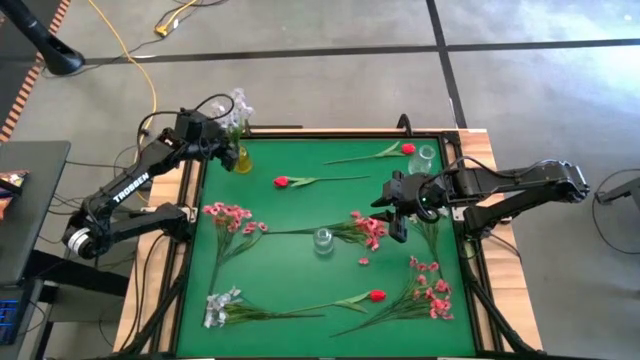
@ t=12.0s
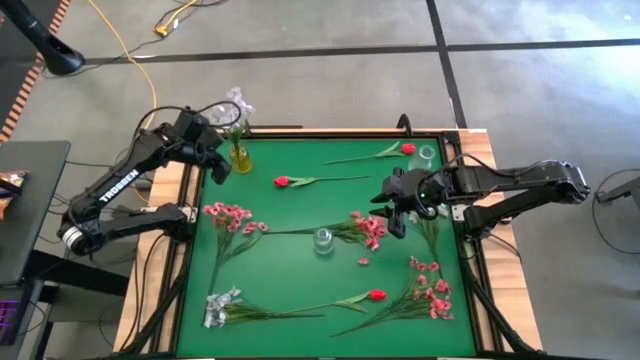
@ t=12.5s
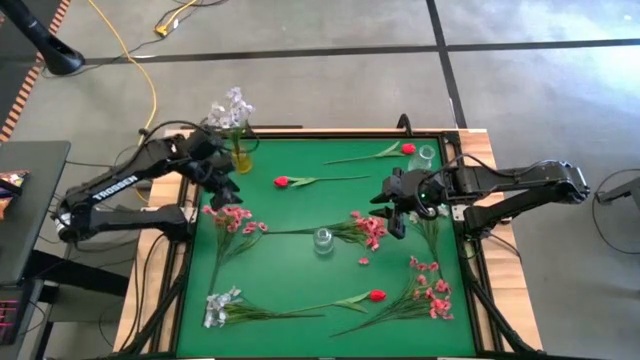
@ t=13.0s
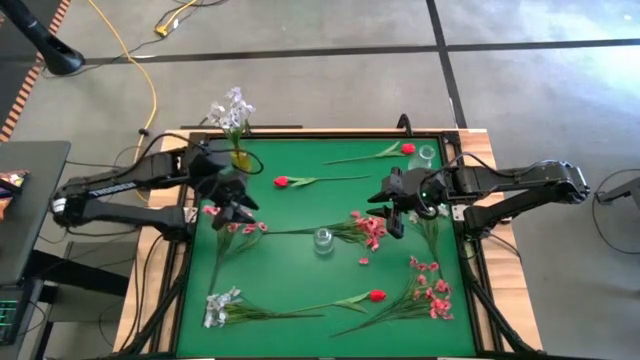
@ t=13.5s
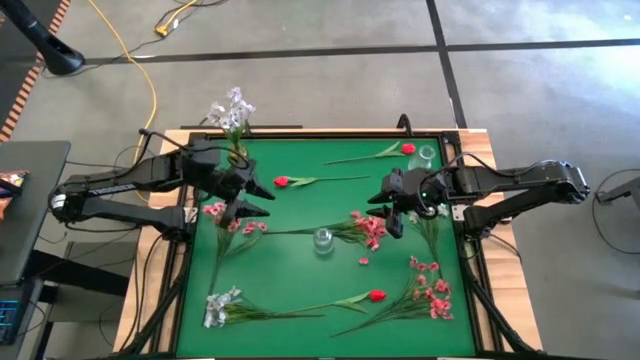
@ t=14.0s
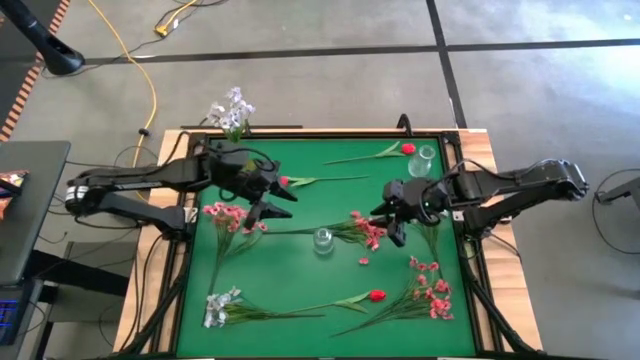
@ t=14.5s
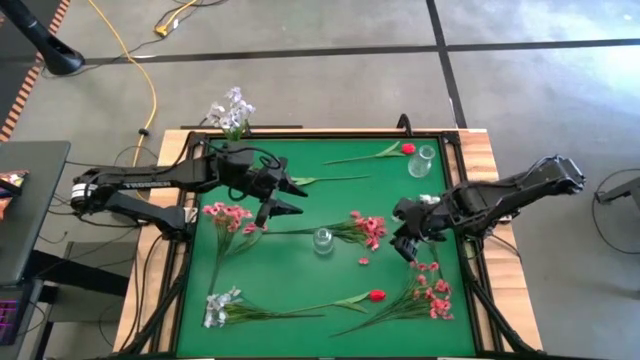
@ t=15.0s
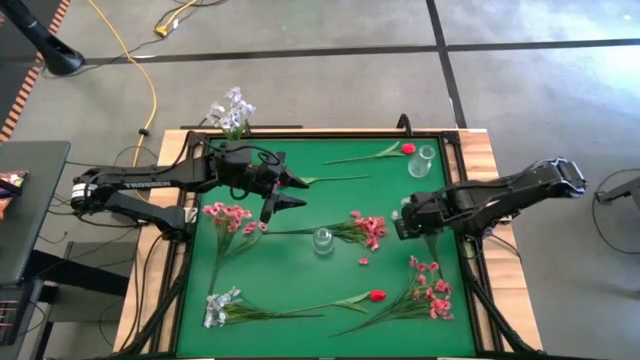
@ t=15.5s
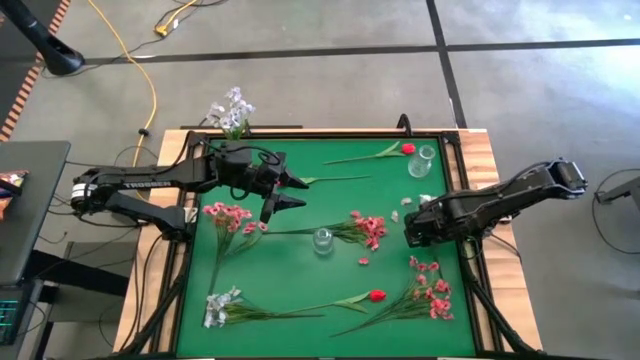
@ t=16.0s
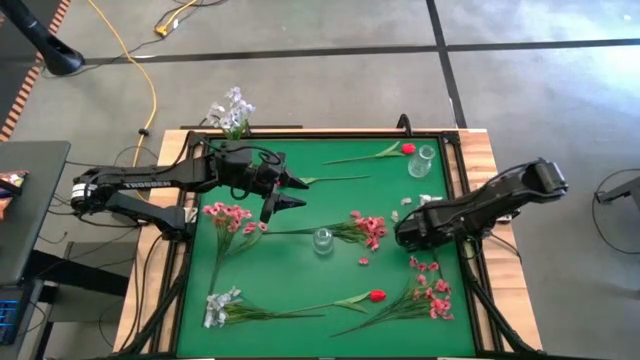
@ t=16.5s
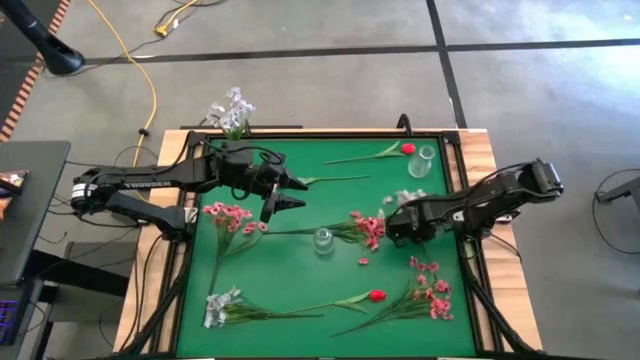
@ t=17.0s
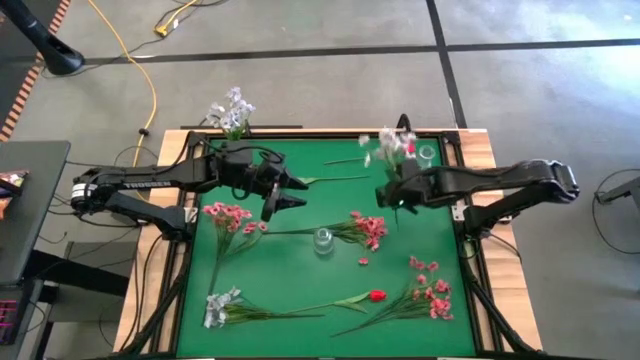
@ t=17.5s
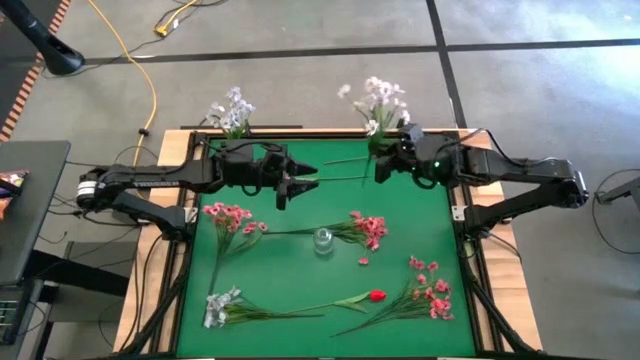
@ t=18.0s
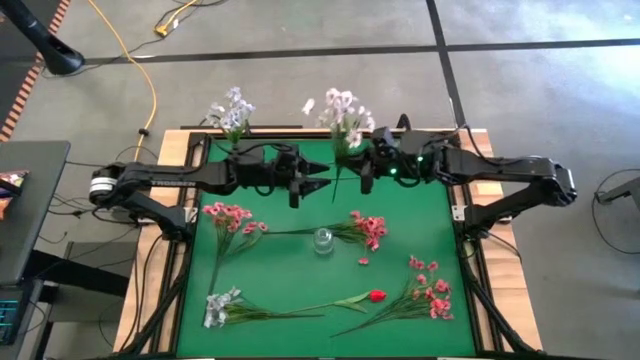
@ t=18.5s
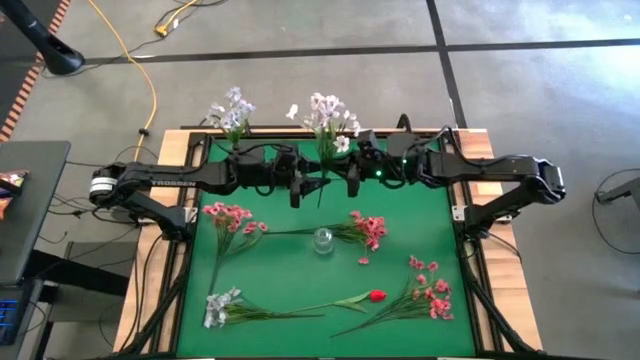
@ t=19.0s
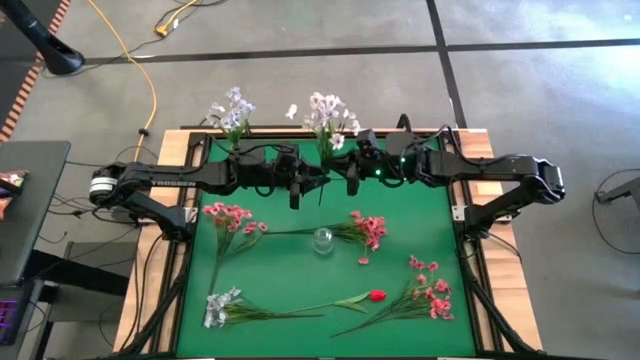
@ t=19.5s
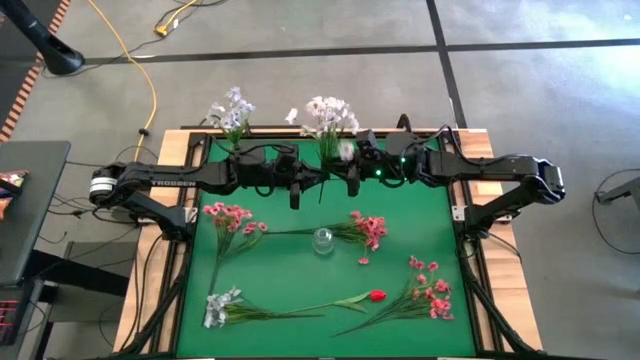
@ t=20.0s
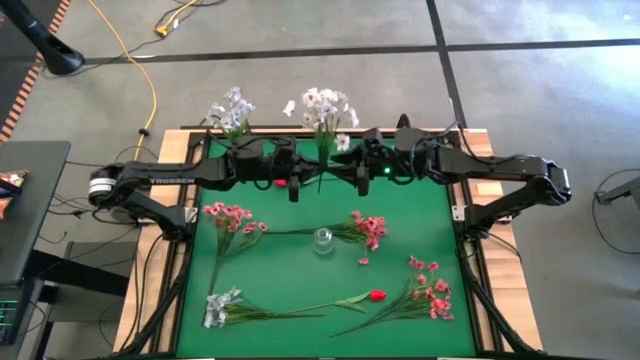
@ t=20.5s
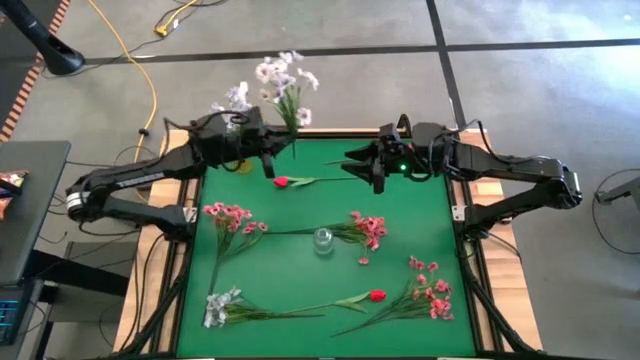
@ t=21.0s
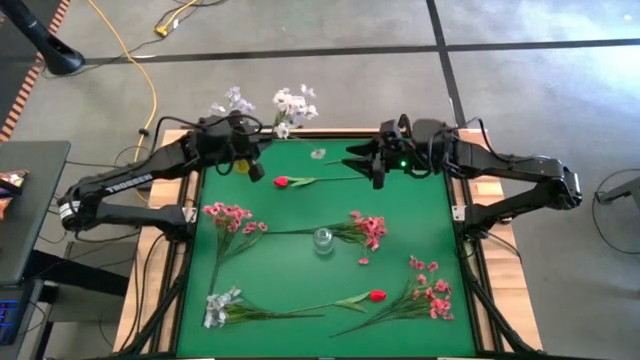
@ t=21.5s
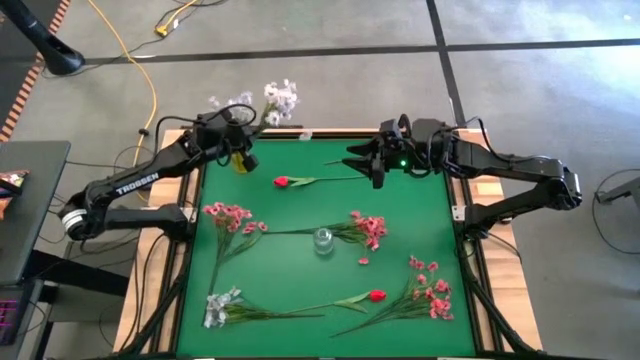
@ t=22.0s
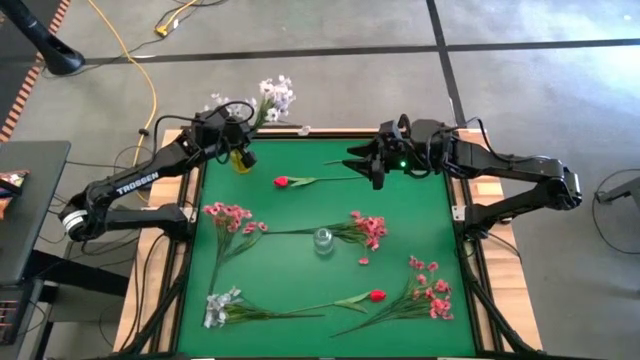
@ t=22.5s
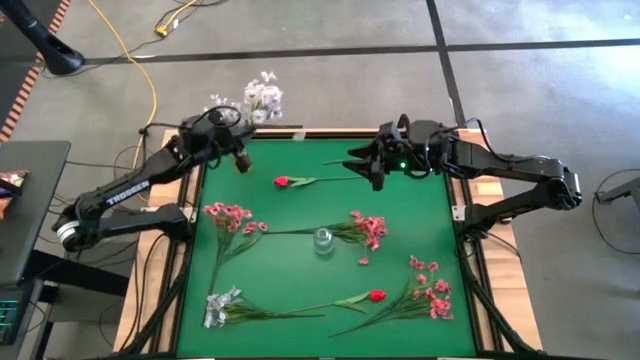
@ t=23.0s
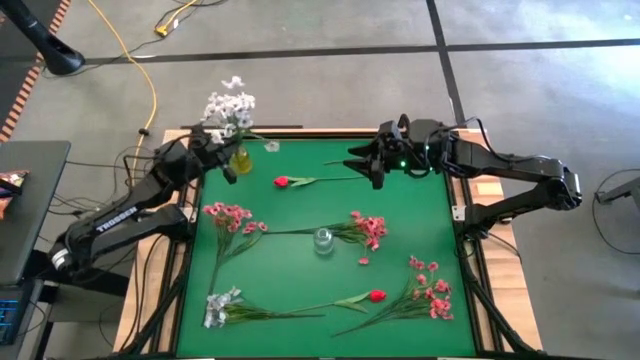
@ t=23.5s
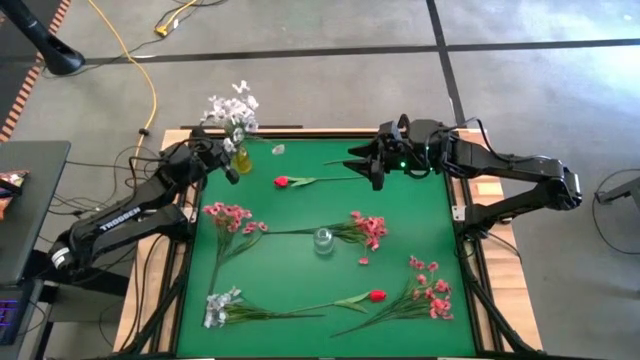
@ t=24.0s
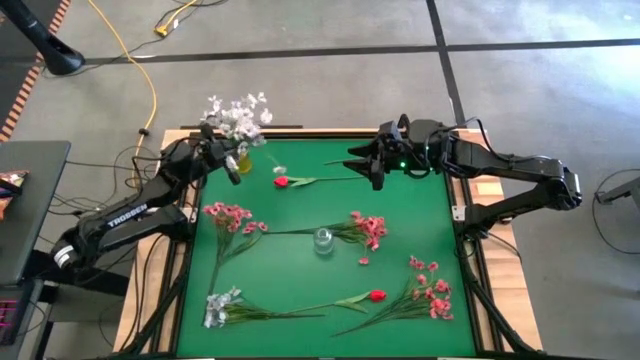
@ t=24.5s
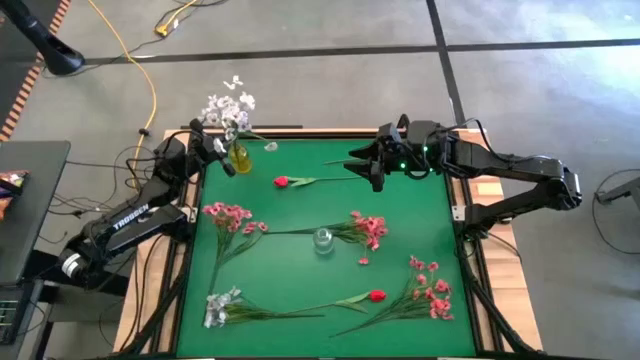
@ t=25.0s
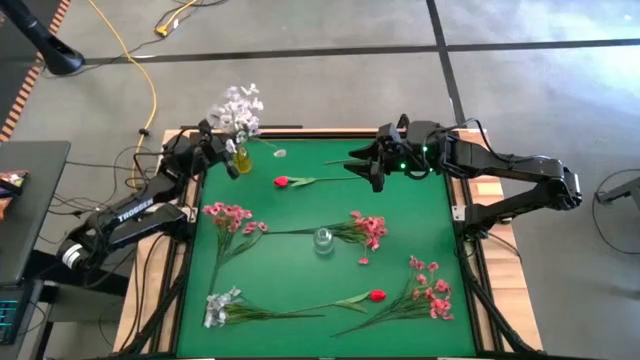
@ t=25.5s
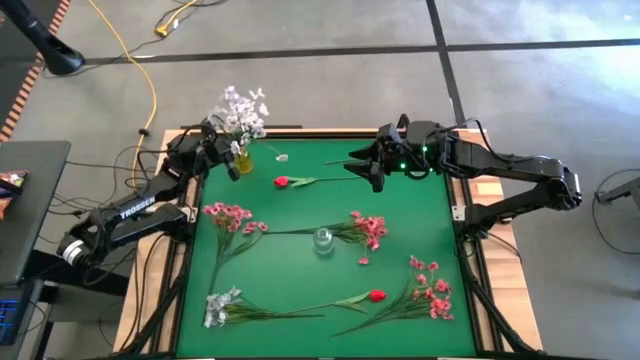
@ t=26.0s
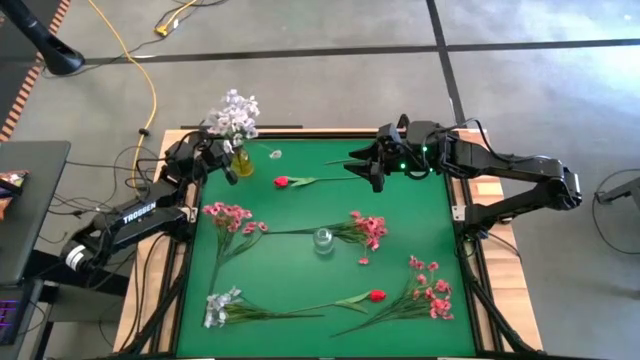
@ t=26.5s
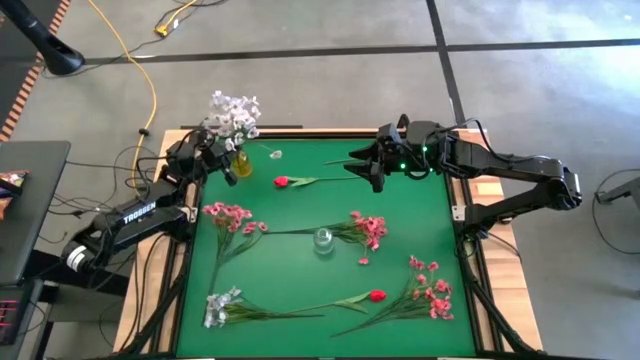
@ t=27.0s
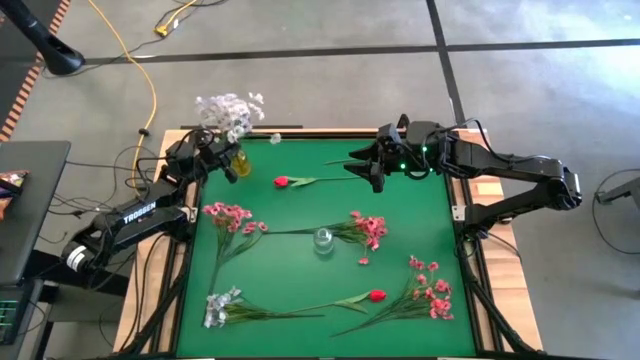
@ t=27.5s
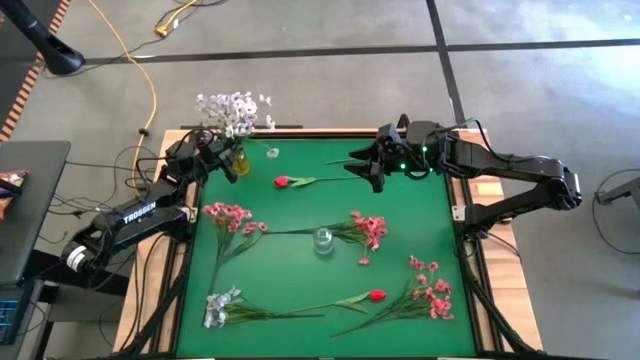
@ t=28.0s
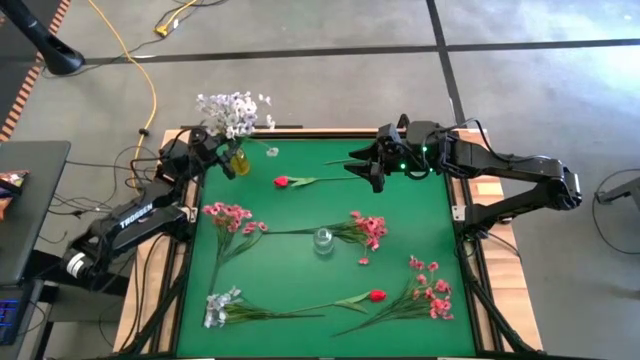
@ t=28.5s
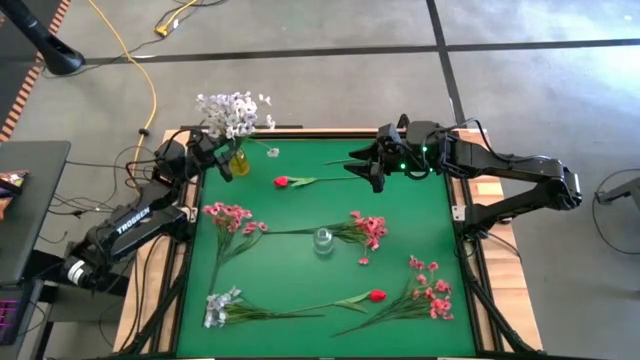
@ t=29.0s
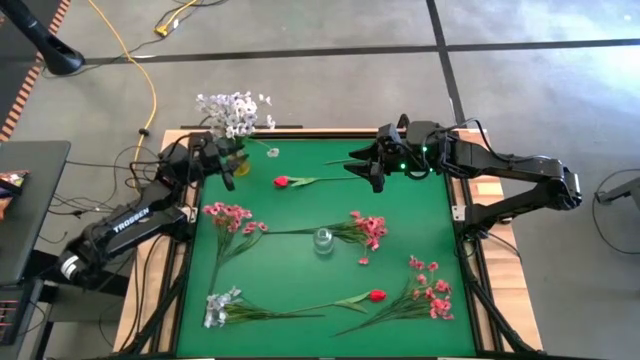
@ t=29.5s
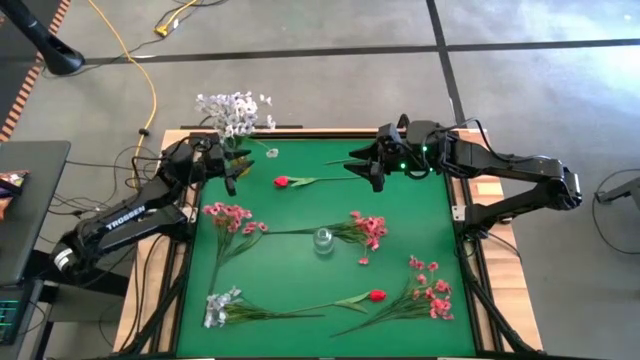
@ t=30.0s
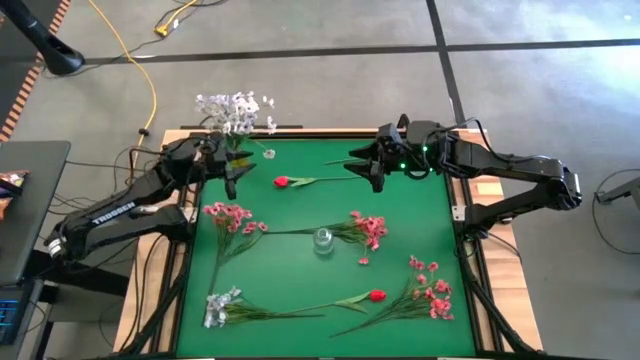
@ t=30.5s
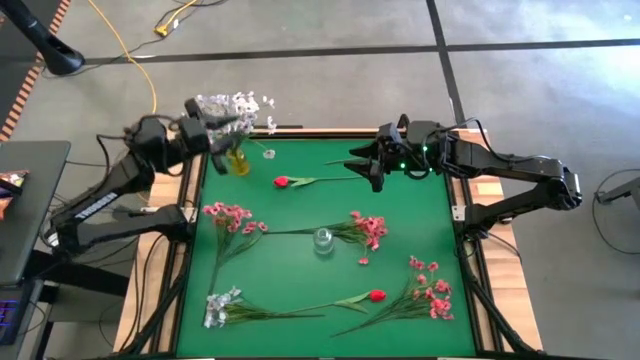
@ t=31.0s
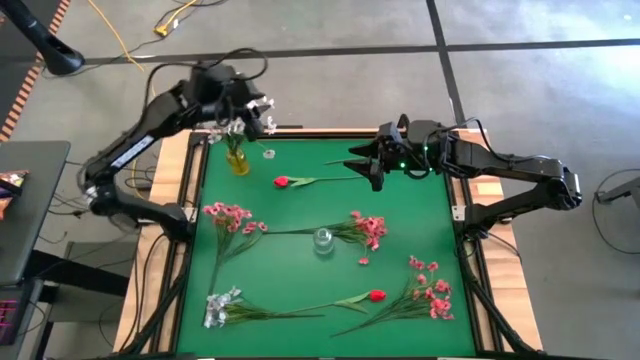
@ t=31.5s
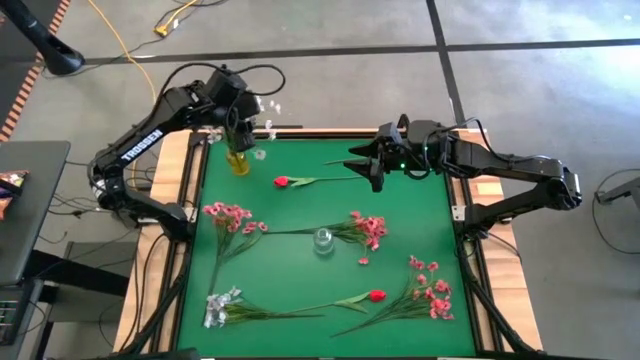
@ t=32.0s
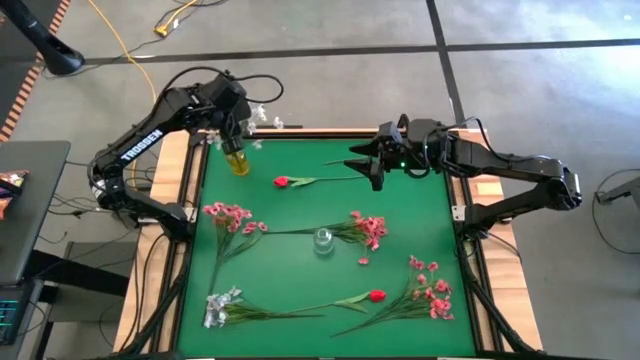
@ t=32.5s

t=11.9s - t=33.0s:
Task: Sort flowers into vase by color
Put the right white flowers into the yellow vase
